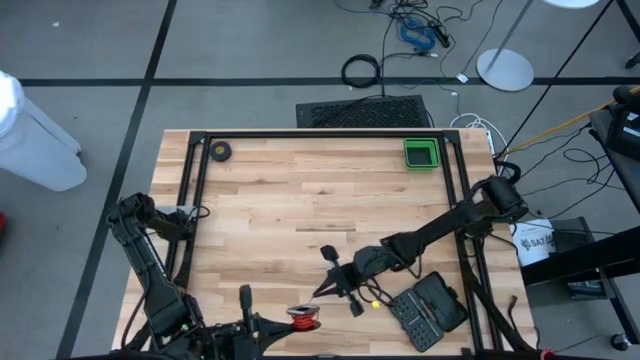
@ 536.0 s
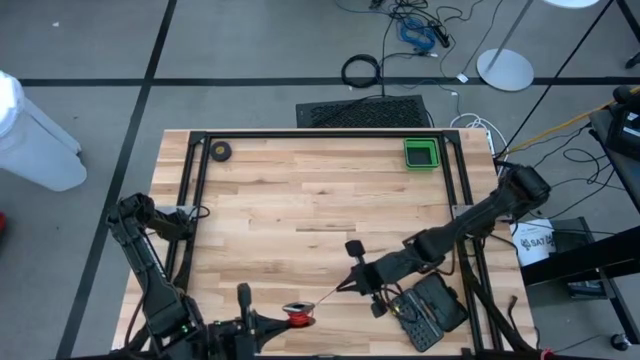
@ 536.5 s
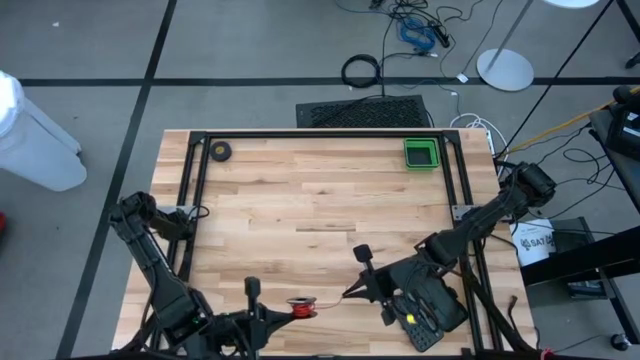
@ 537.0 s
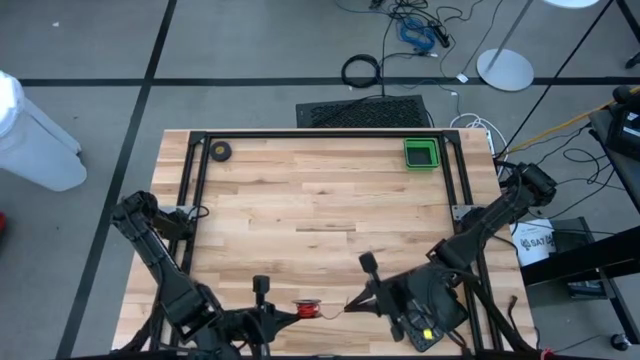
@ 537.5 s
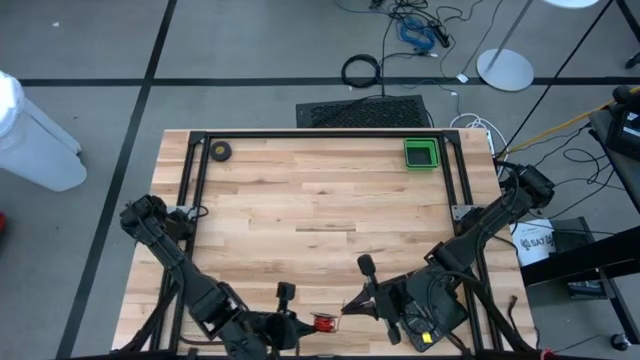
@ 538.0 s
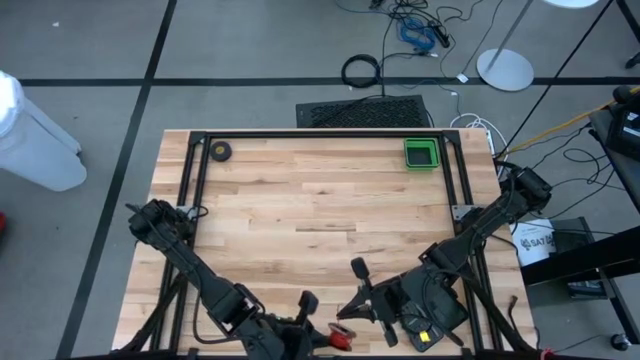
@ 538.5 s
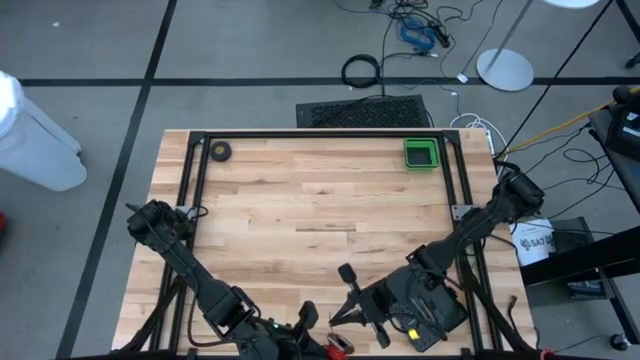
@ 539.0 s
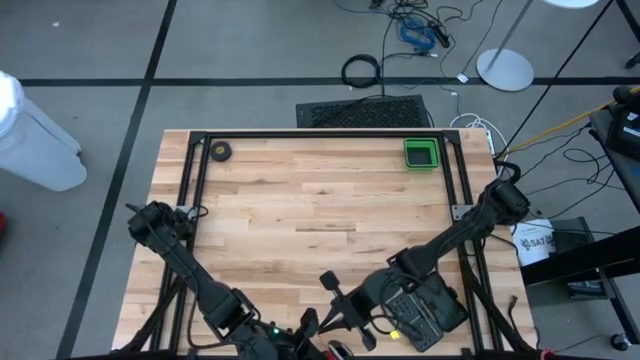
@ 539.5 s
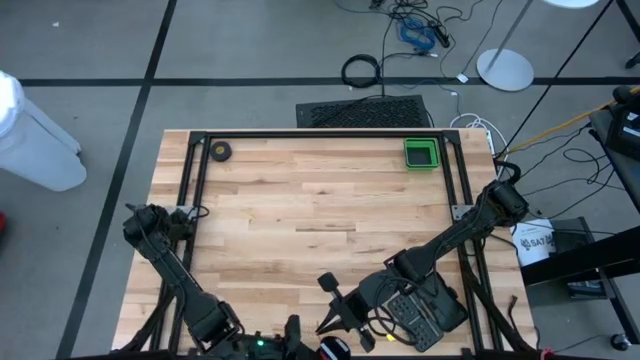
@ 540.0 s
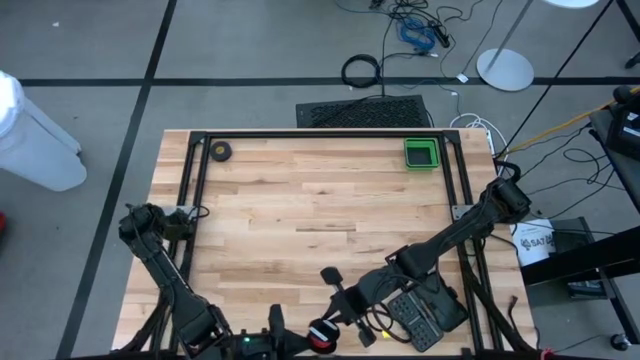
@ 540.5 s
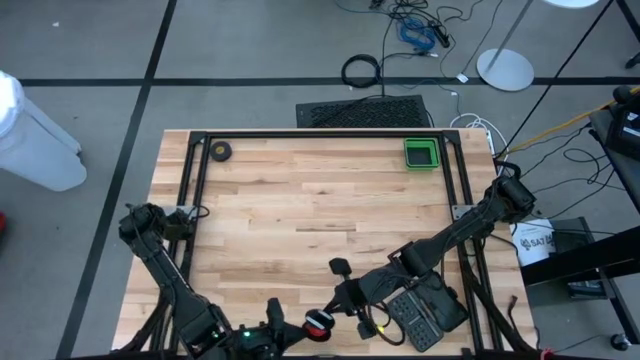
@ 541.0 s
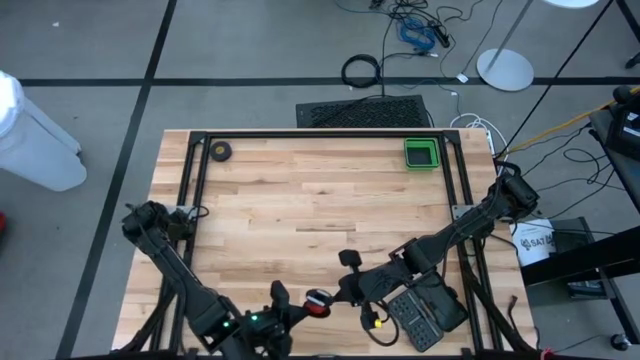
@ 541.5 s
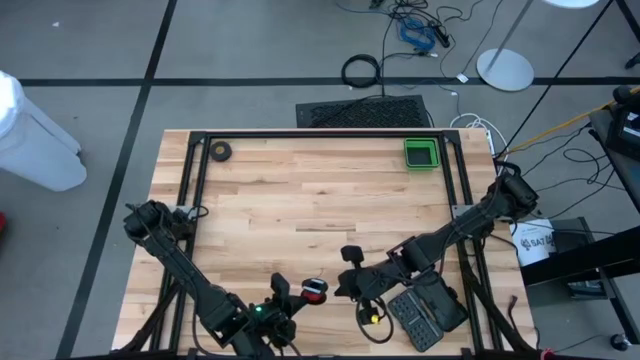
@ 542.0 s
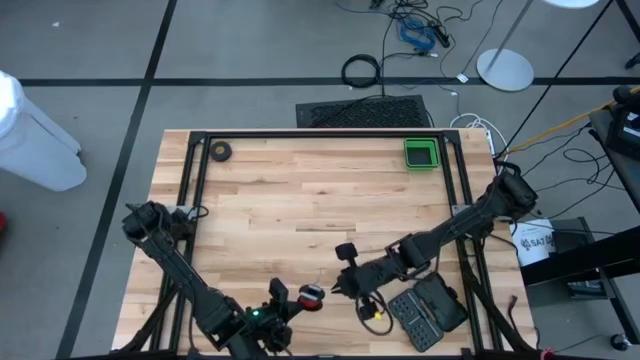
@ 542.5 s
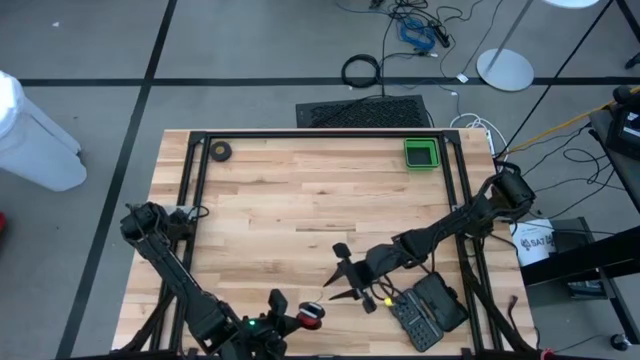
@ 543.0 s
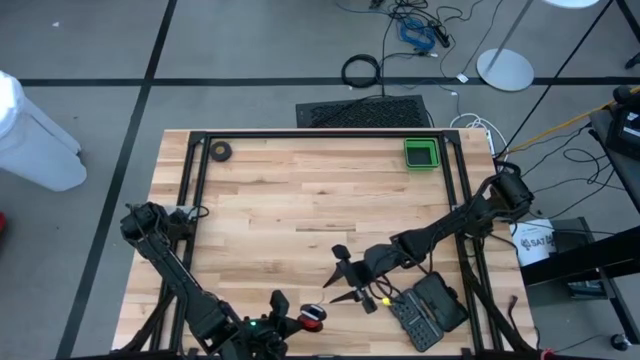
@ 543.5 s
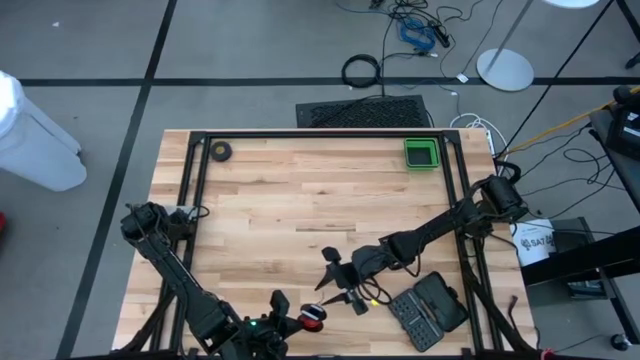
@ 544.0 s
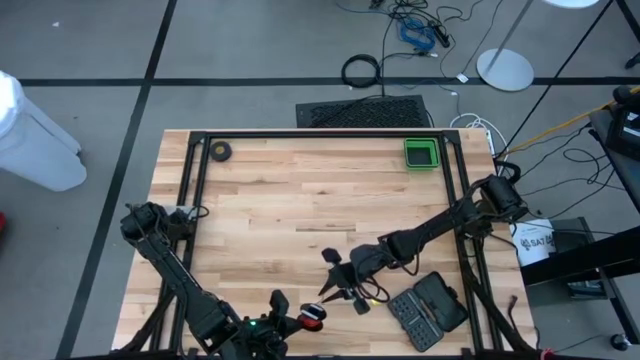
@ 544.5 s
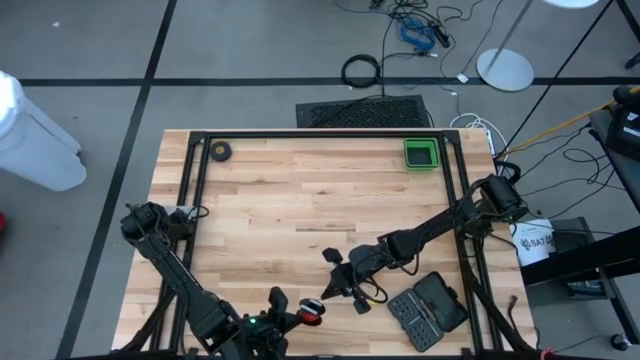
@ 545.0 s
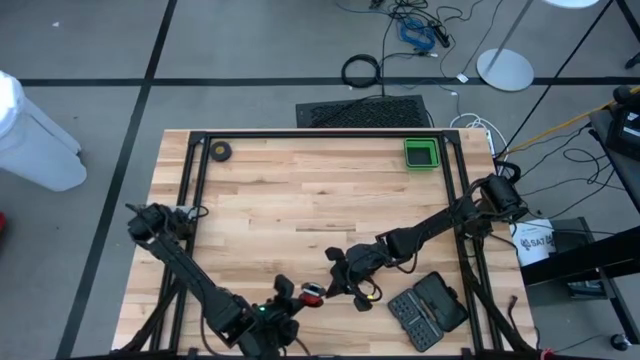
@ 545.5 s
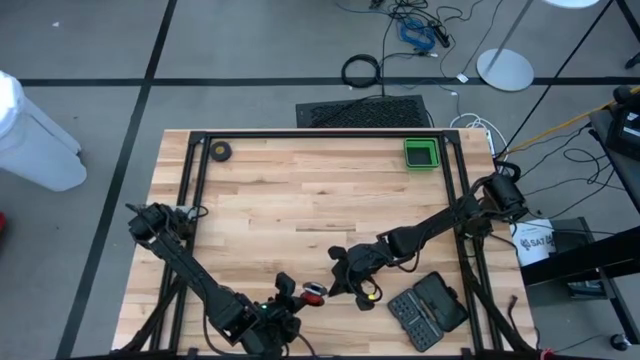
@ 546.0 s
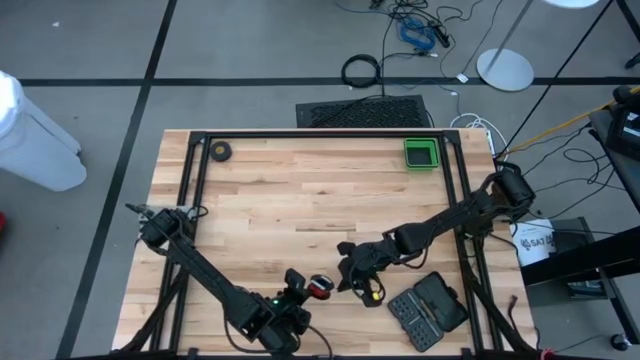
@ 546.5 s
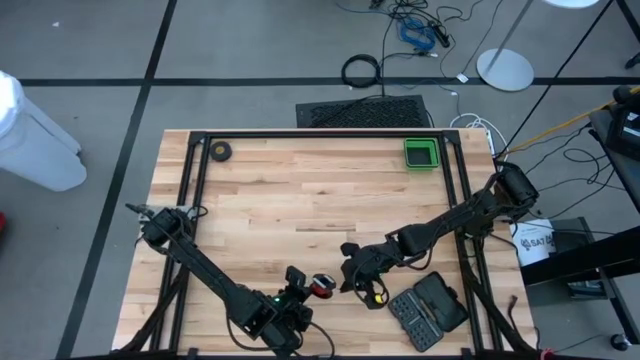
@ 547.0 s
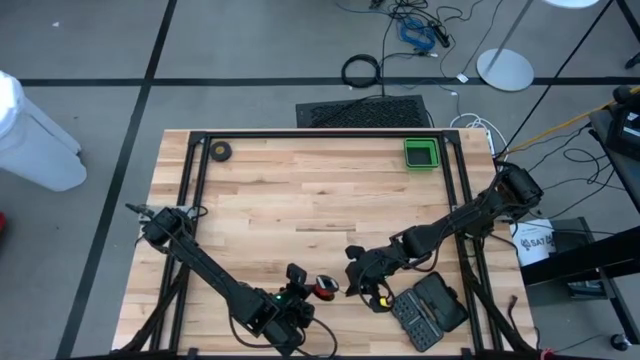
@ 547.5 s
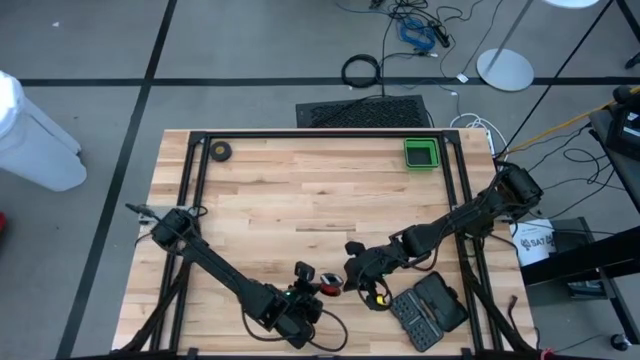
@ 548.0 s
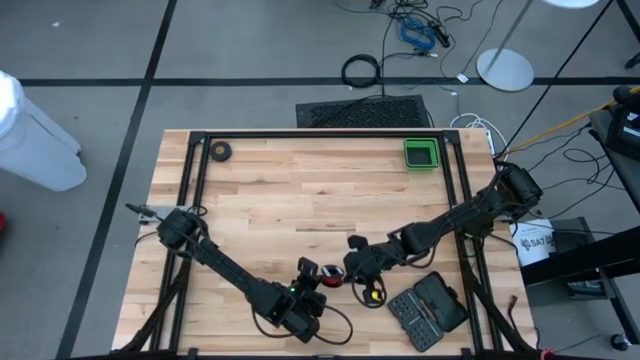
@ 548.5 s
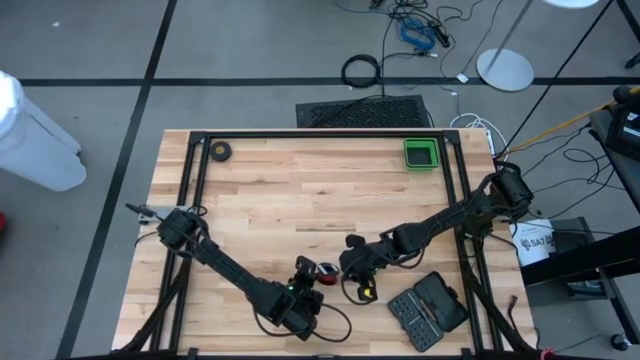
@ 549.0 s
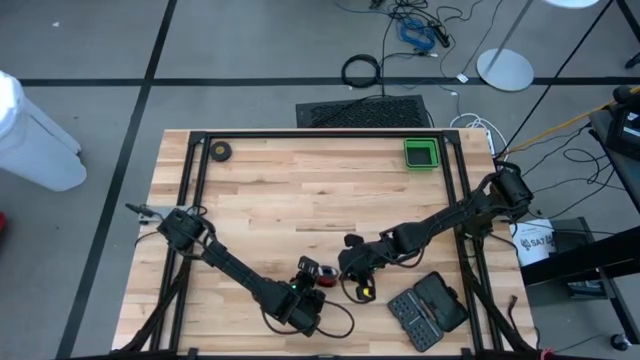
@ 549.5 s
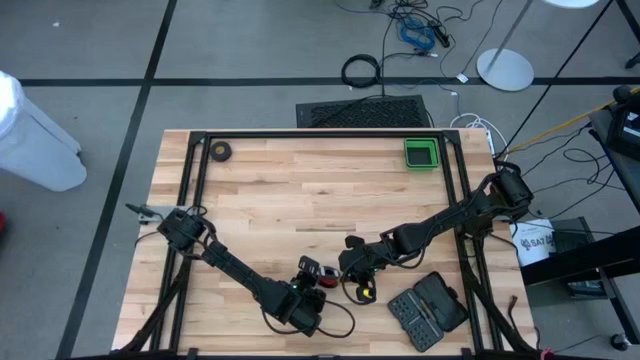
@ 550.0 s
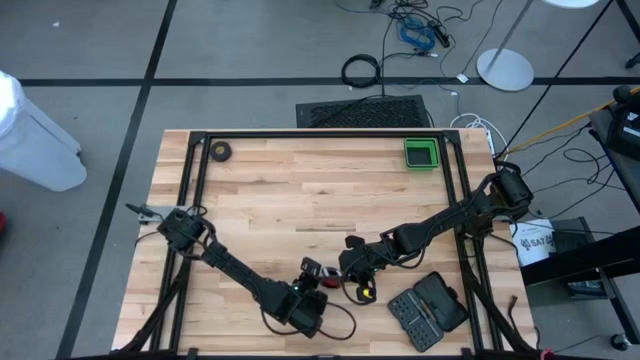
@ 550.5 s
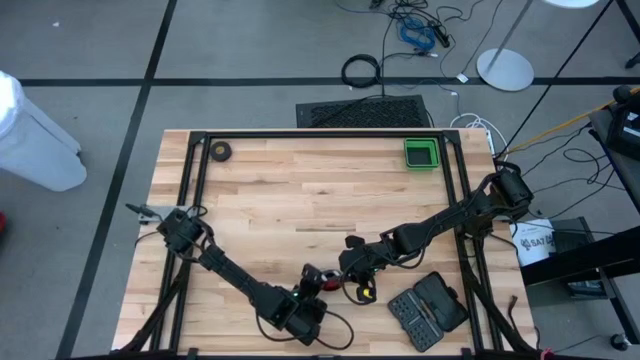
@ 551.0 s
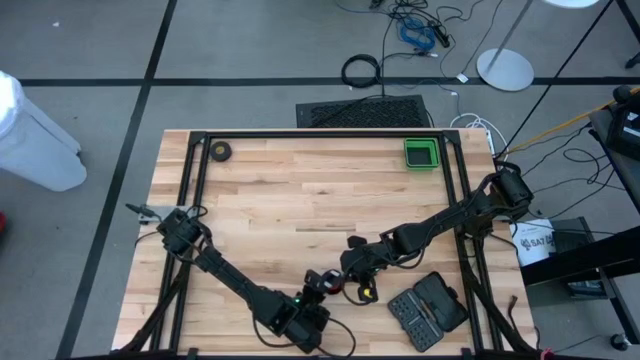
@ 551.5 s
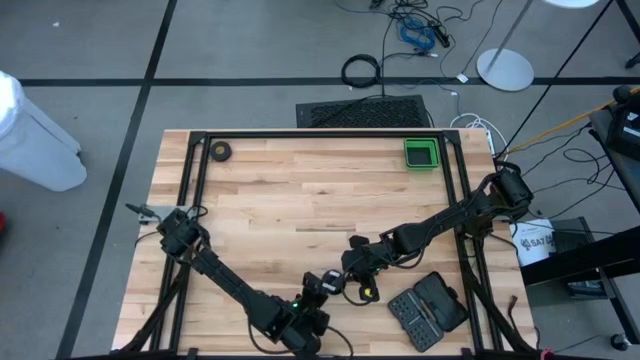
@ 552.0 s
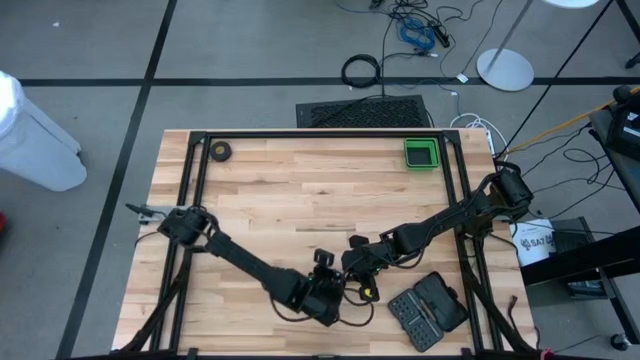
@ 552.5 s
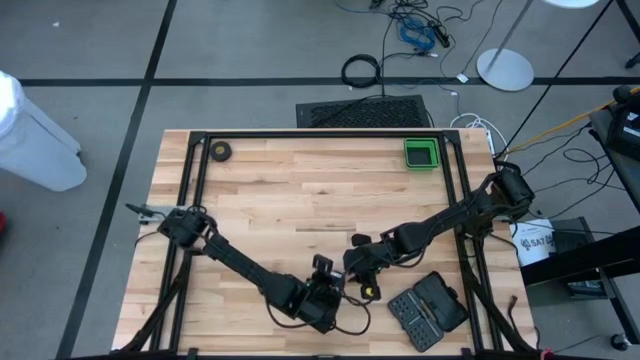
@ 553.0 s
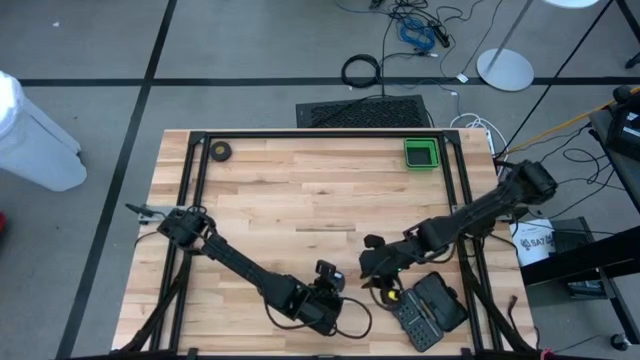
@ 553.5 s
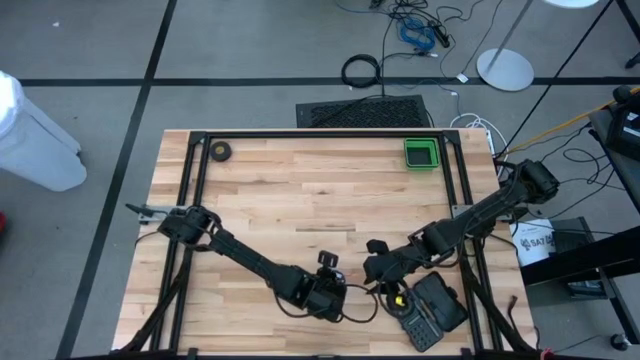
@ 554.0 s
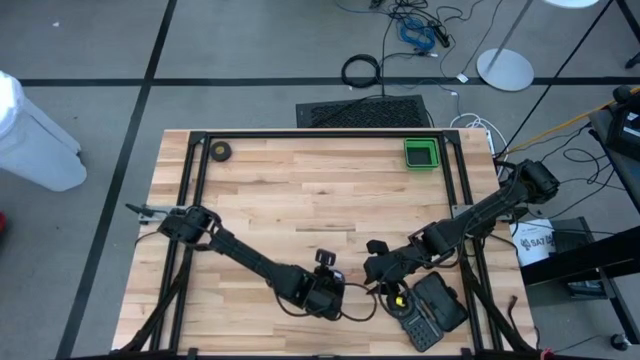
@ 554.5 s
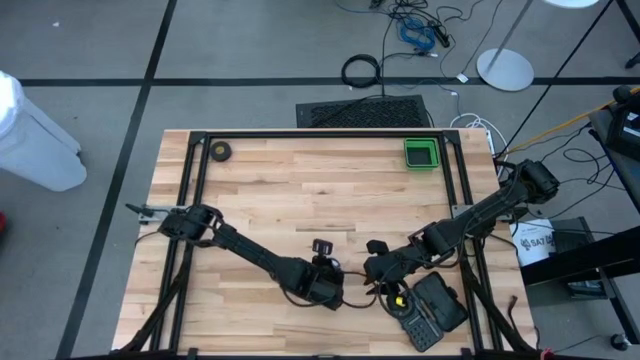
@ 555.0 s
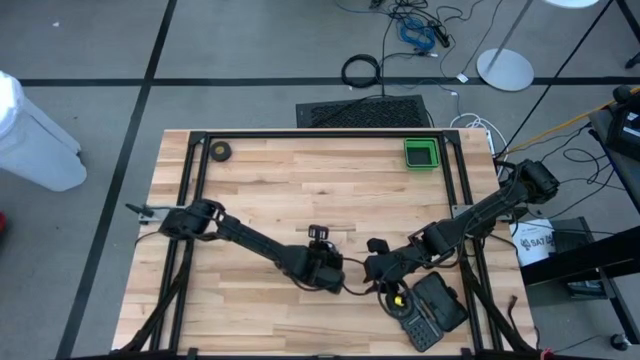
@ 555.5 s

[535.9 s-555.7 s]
Task: Coil cords
Coil the red wire into the spool
